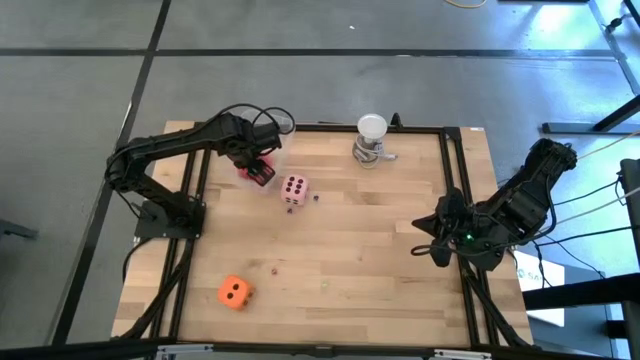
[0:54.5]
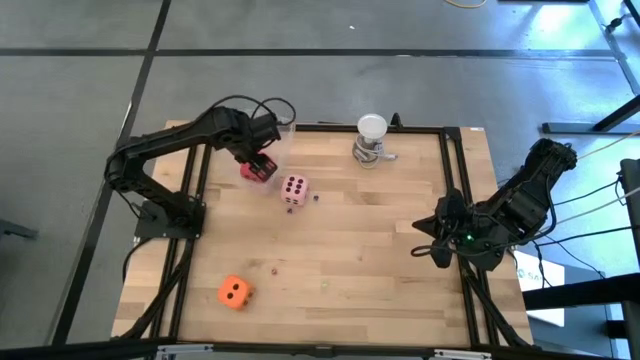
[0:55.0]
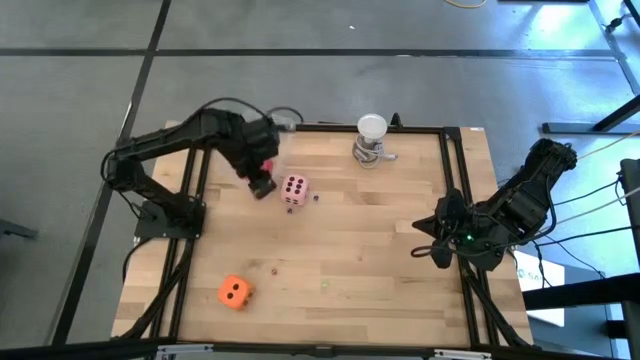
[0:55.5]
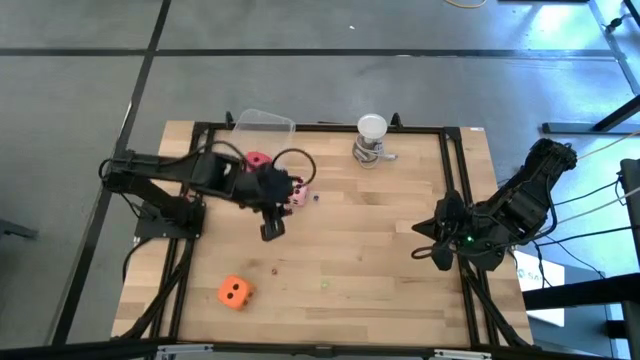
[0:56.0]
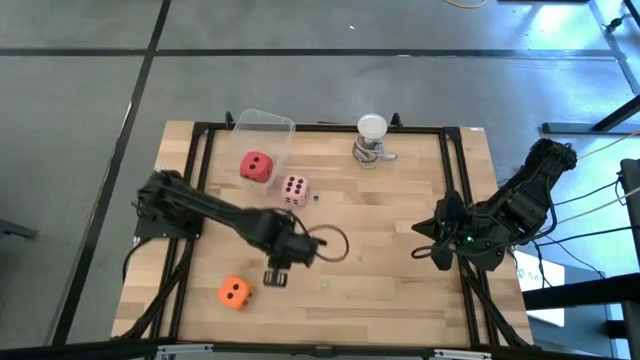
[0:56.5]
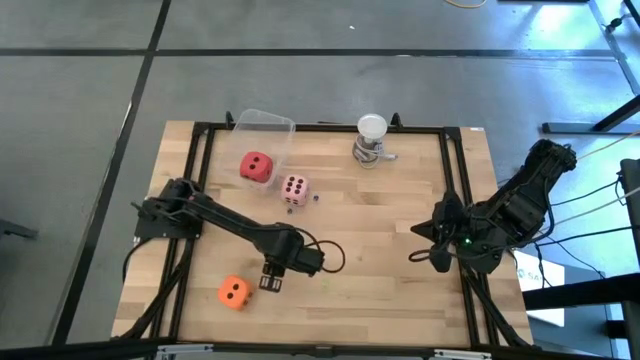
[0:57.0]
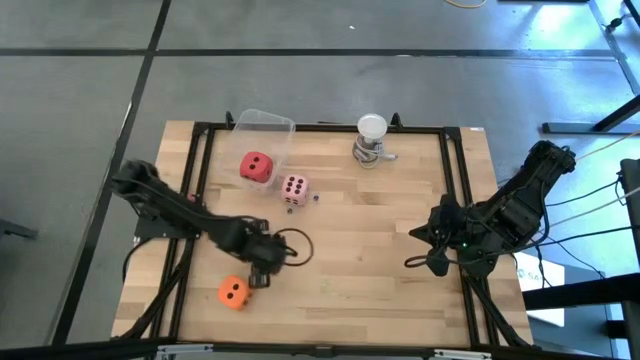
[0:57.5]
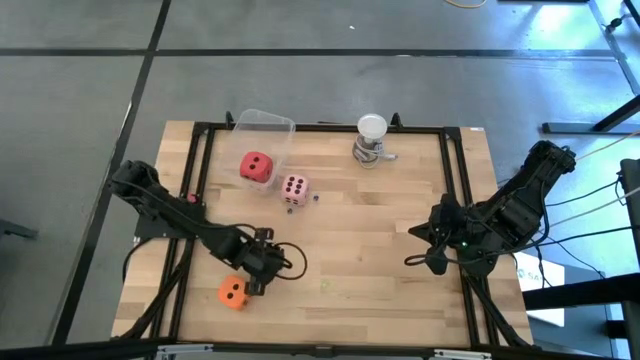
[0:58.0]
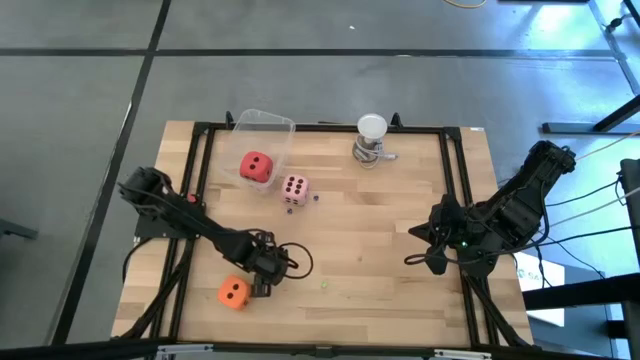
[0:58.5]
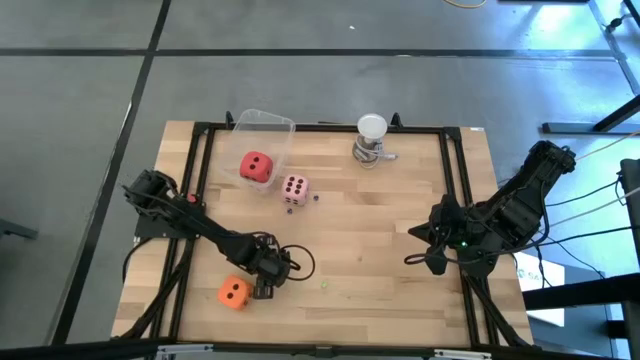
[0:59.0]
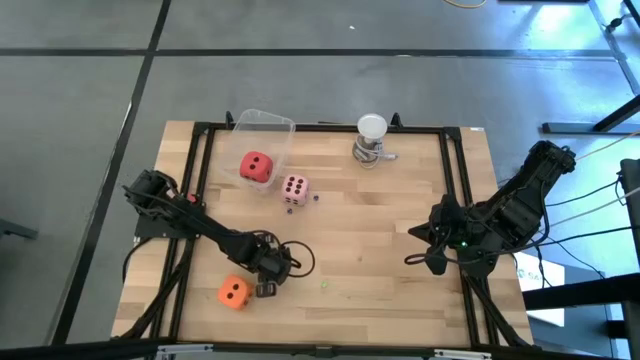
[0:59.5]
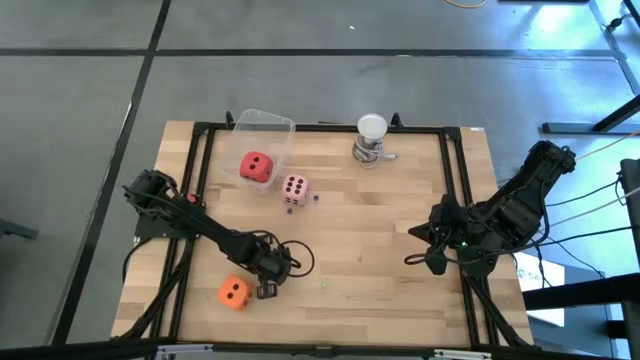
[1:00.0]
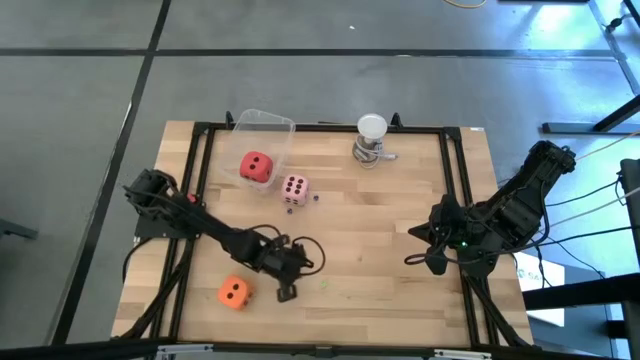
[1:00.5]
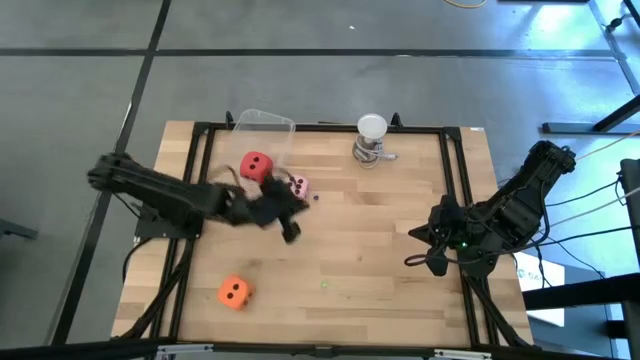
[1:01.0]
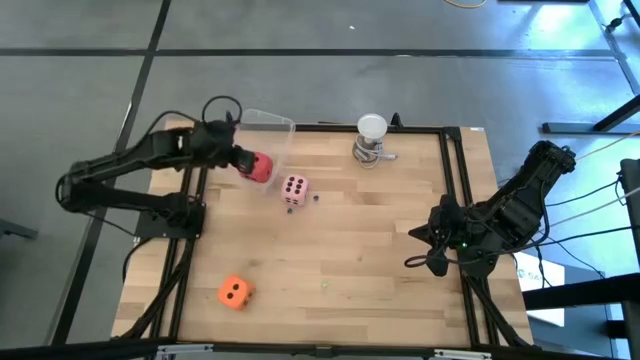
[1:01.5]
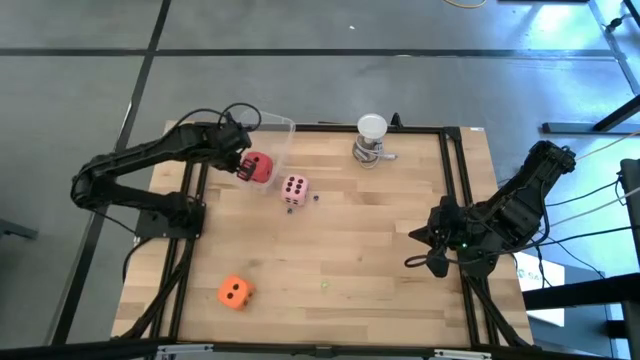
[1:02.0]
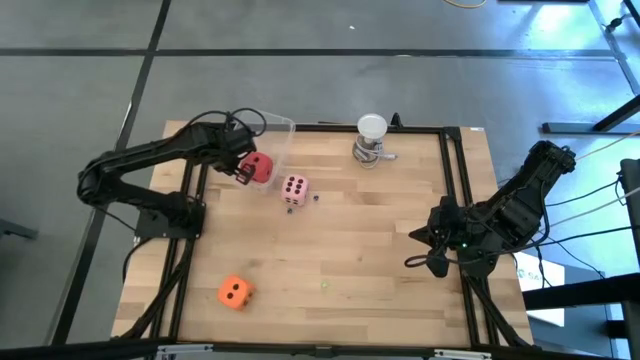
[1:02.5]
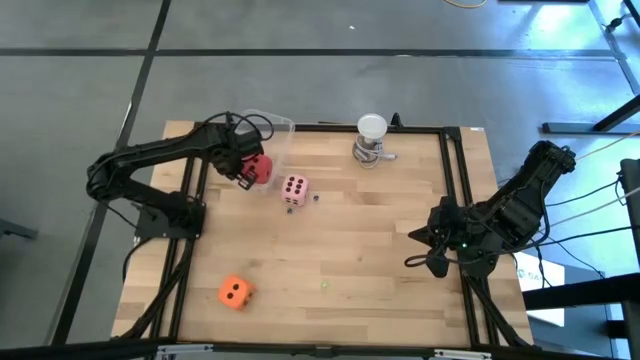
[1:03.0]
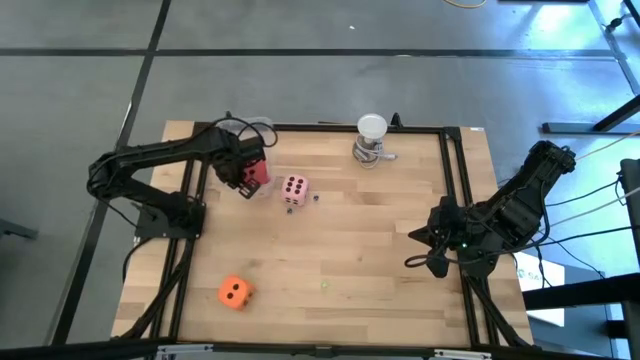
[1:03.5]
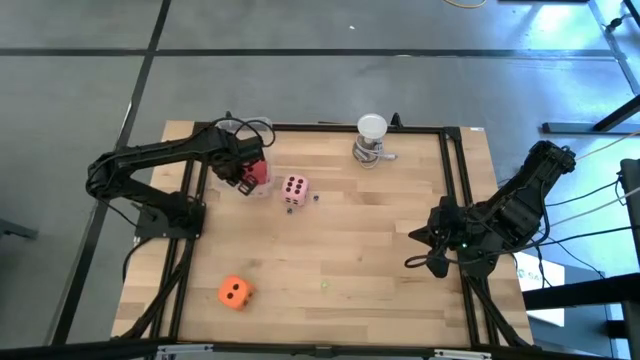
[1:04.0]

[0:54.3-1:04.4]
Task: Pick & Place Dice
Put the small red dice into the transparent bin

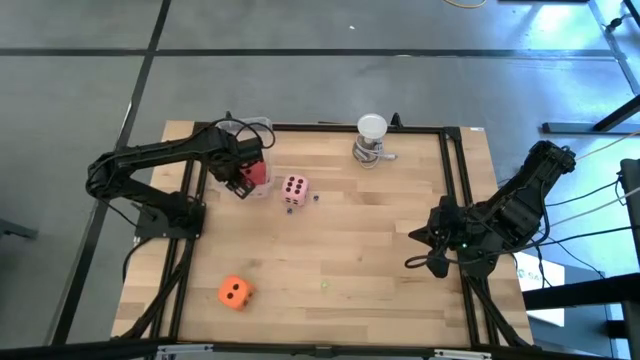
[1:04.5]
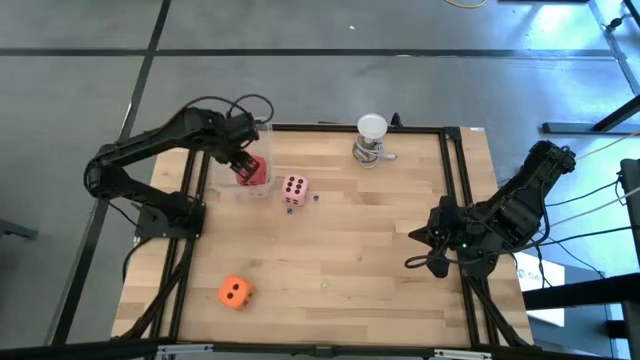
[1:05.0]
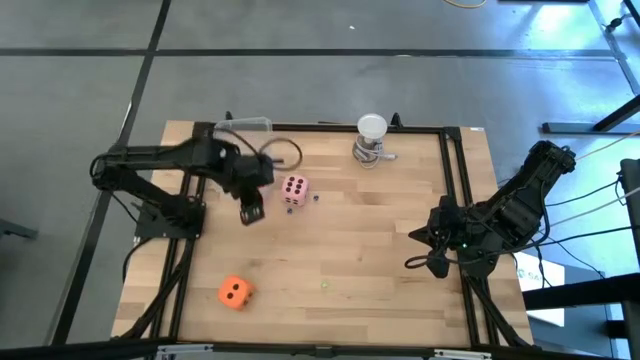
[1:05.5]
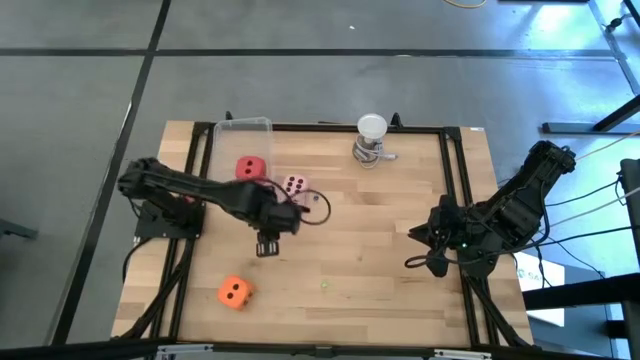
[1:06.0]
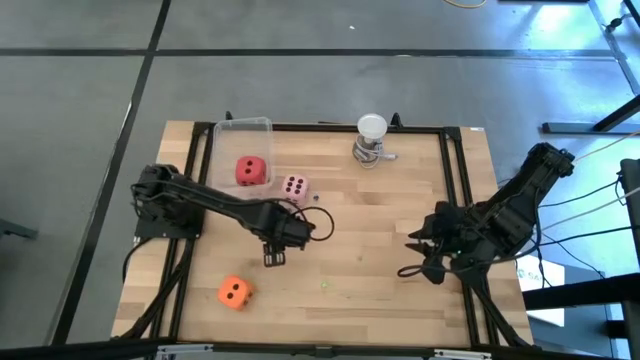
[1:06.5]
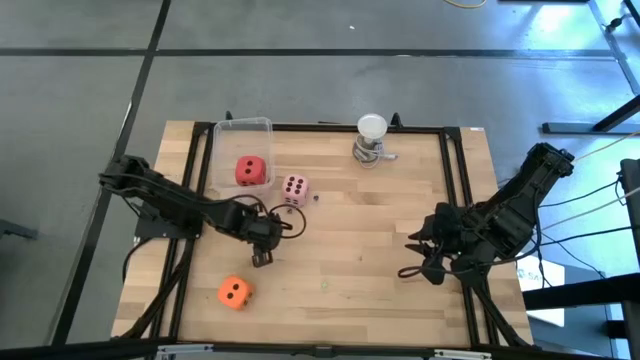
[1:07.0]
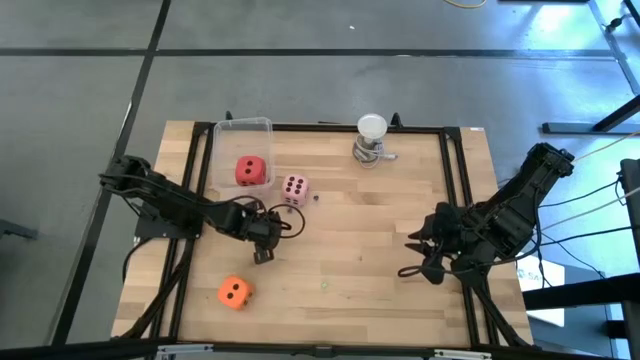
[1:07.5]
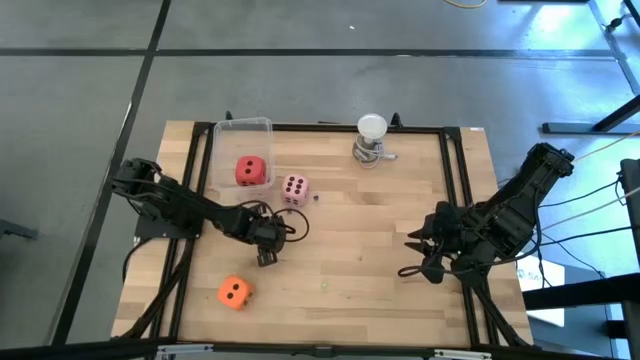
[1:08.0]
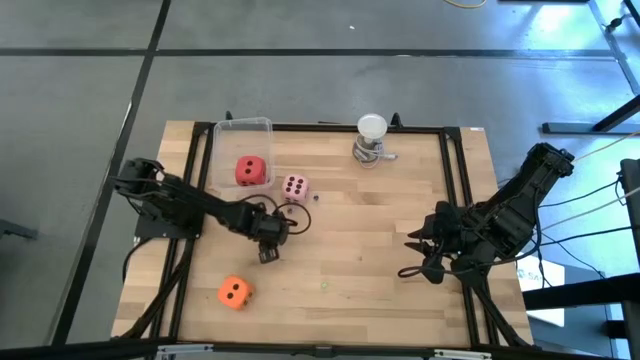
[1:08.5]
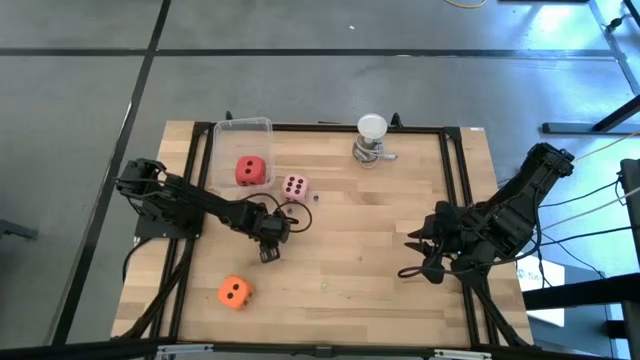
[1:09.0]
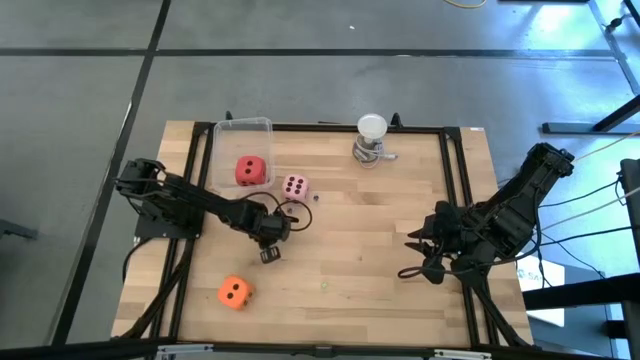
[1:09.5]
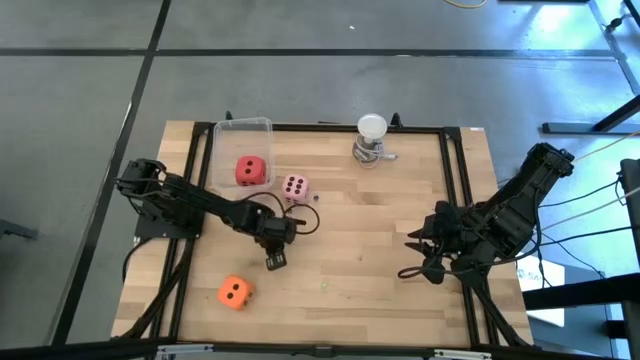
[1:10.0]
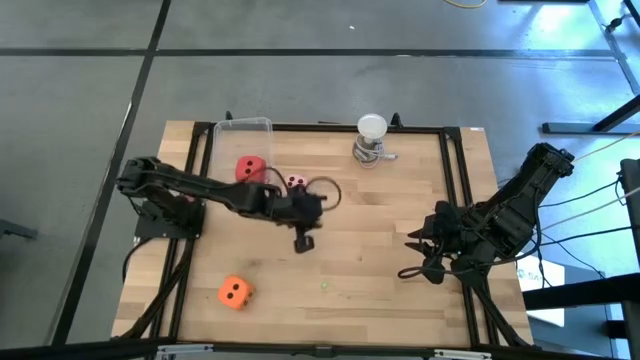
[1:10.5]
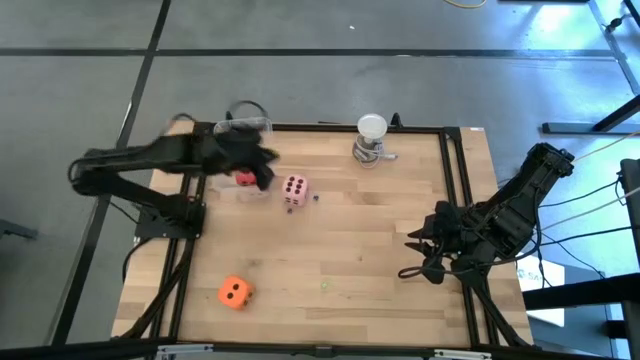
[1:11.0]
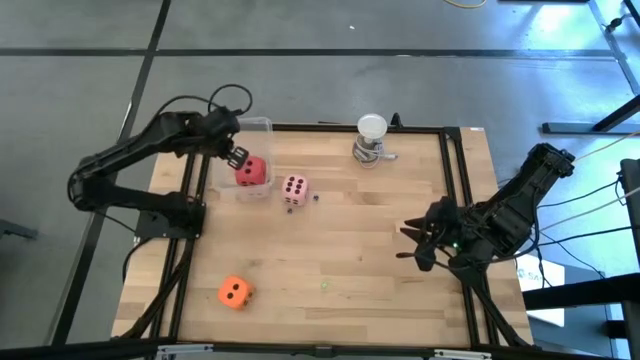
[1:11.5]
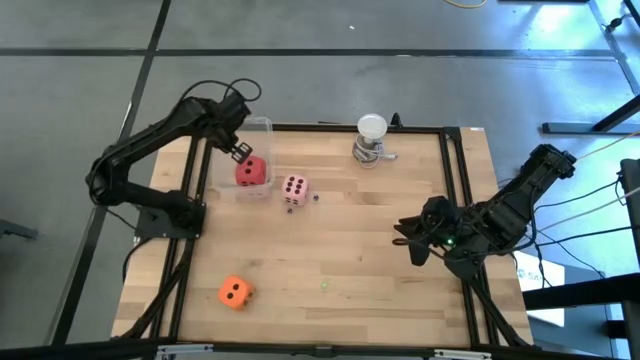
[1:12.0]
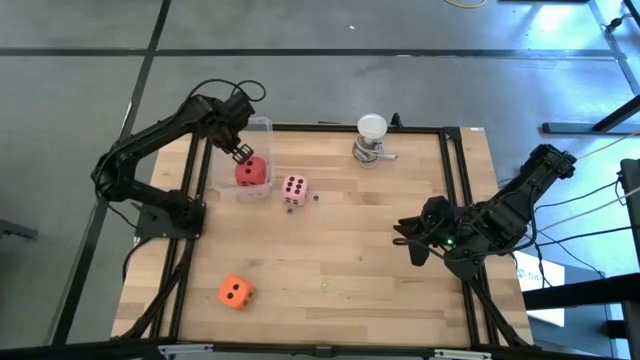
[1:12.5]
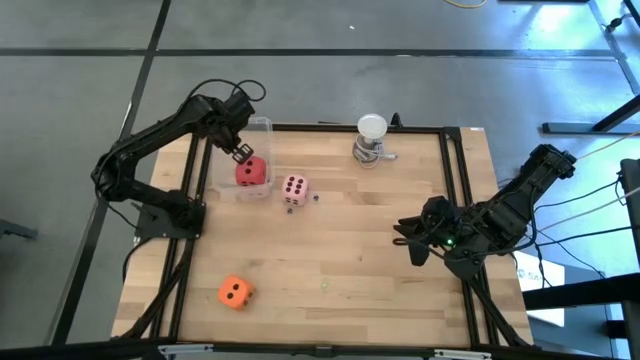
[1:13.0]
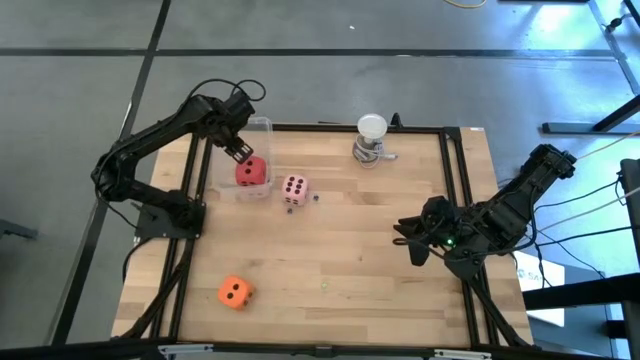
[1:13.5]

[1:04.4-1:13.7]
Put the small yellow dice into the transparent bin

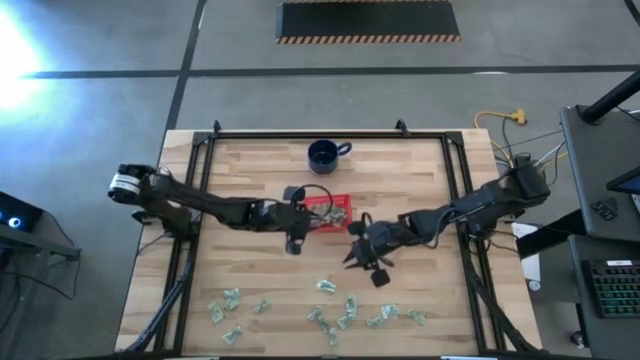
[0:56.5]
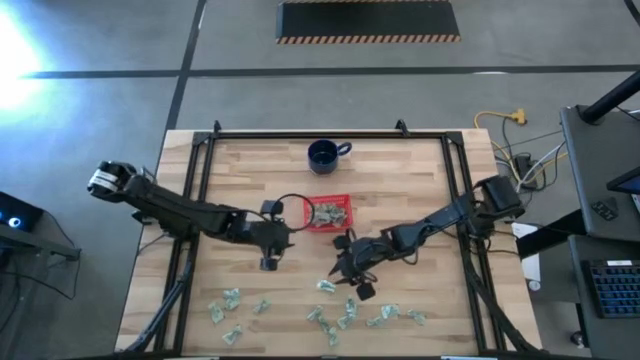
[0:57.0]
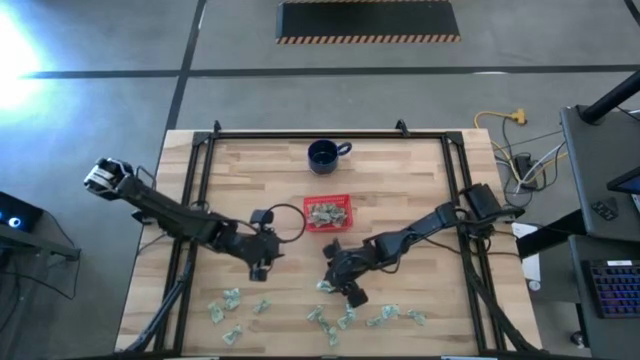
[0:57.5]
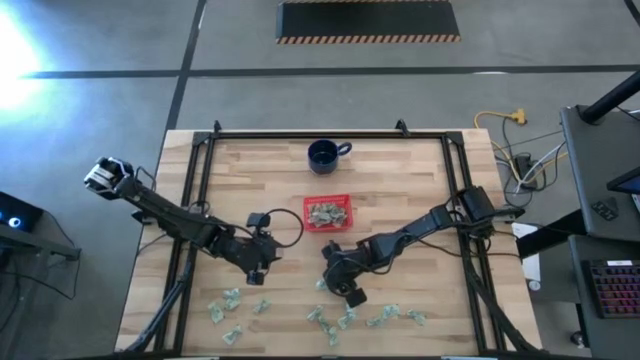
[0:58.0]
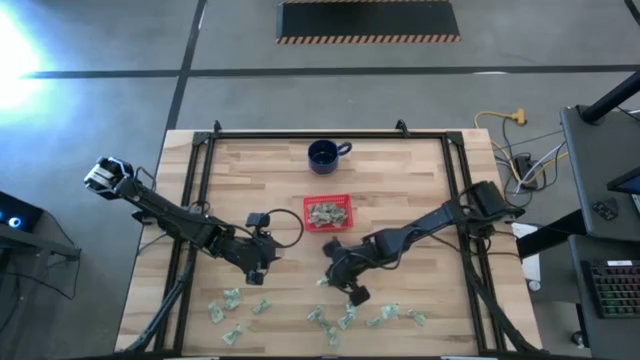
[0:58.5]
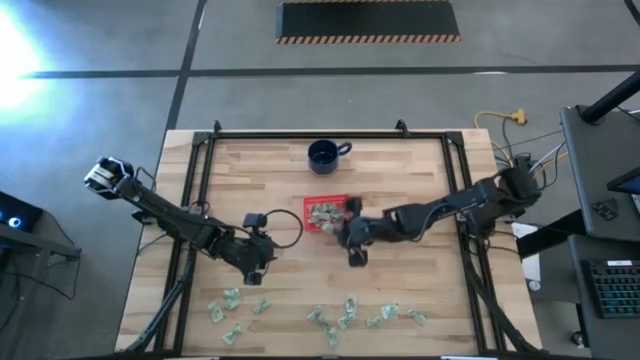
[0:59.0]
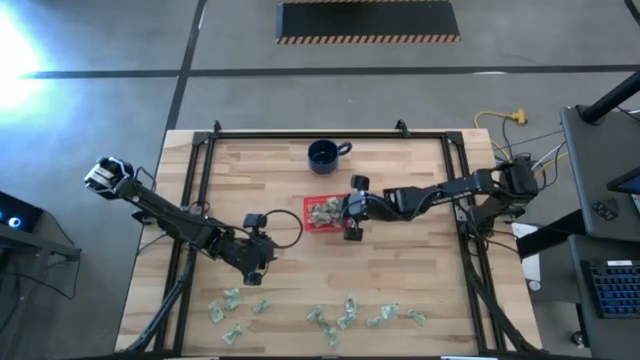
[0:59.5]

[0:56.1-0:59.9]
Task: Pick and place items into bin
Put the stevia packet into the red bin
